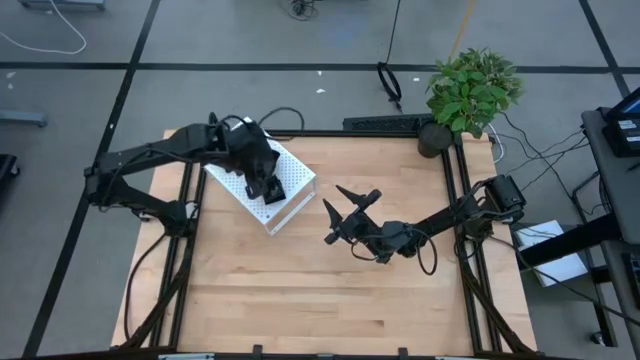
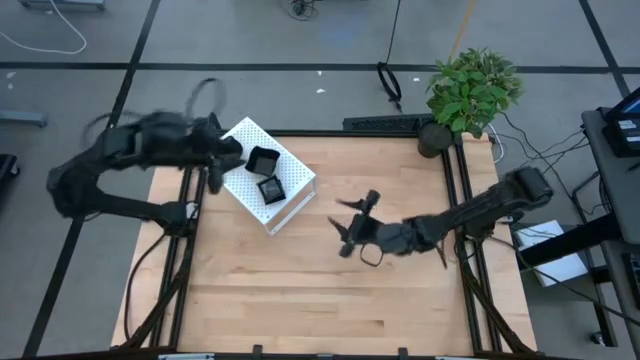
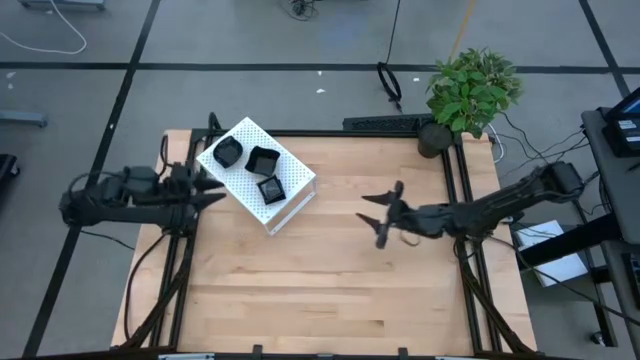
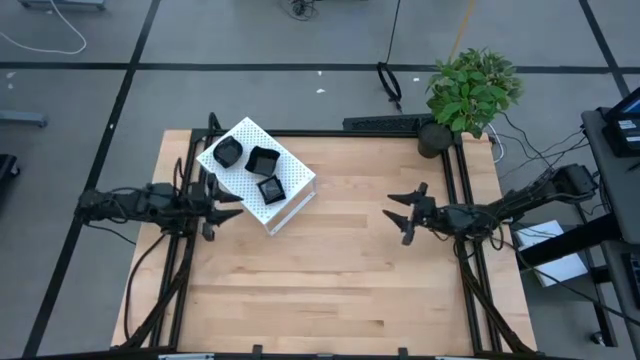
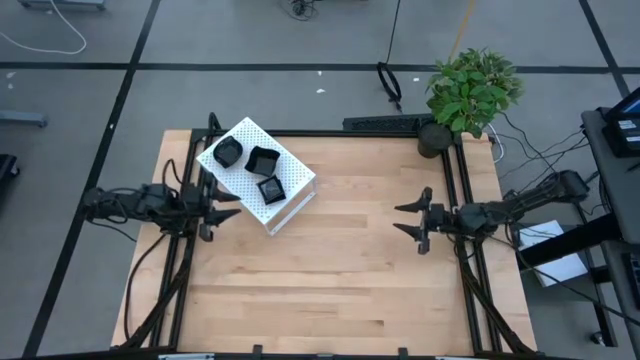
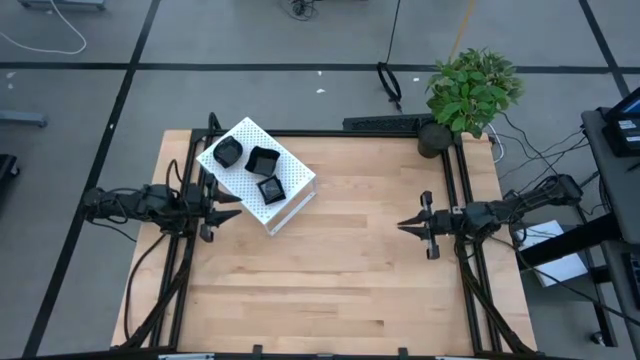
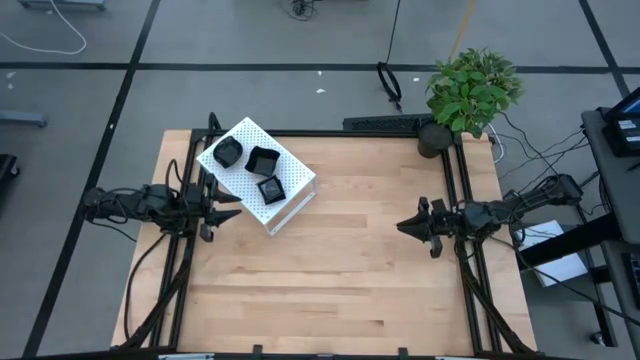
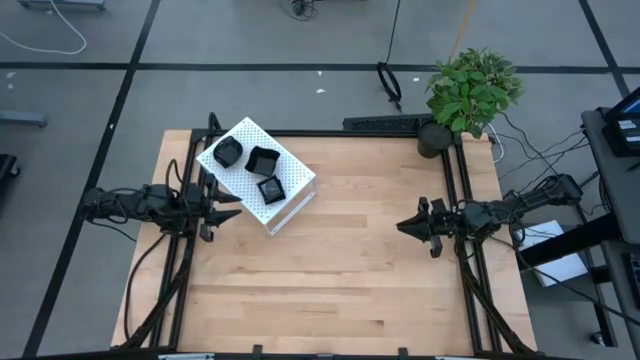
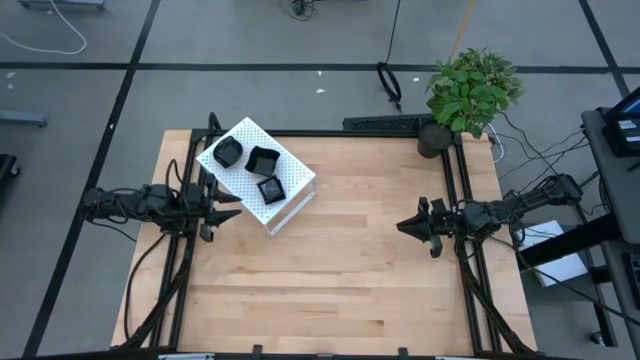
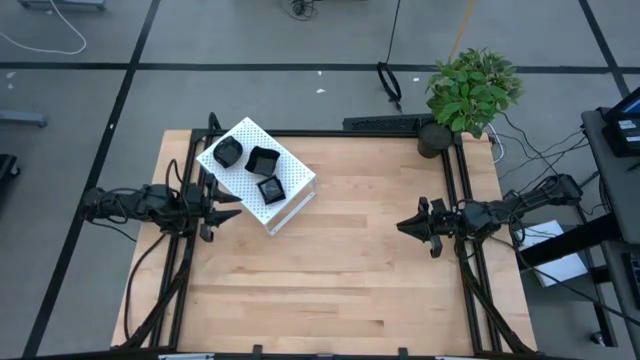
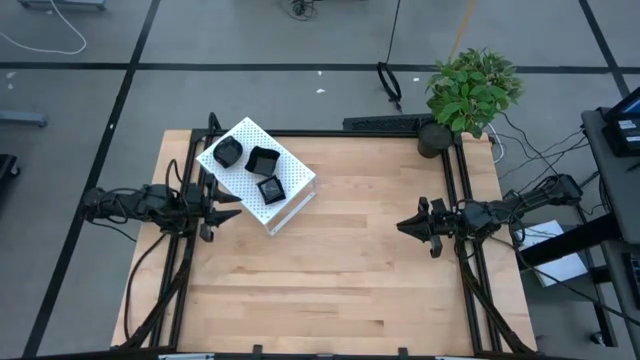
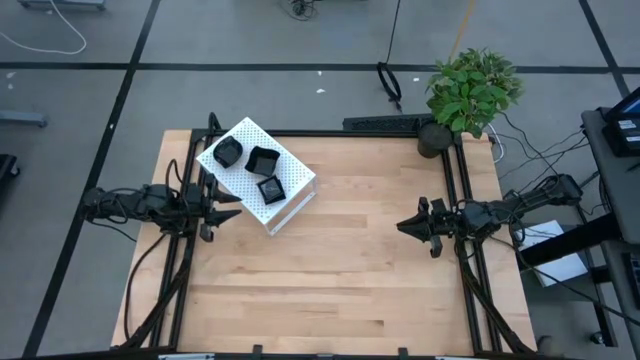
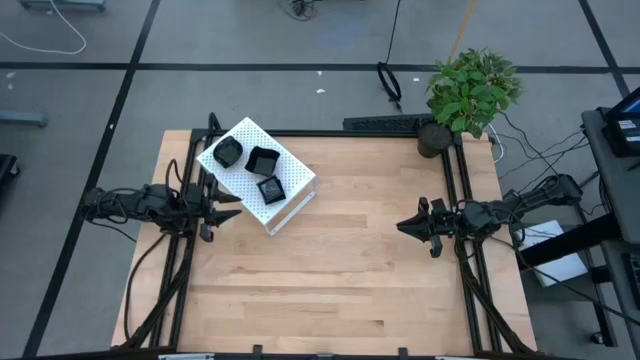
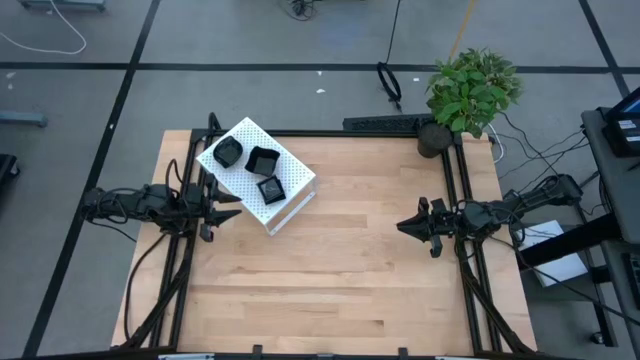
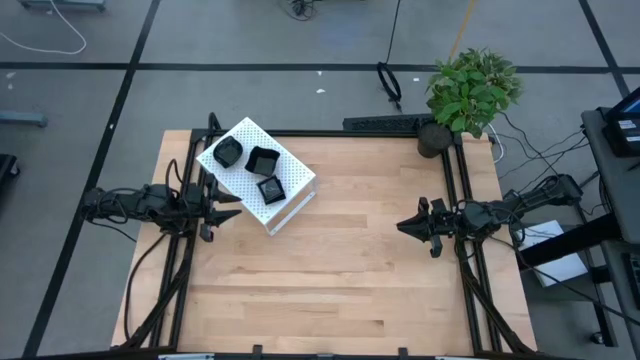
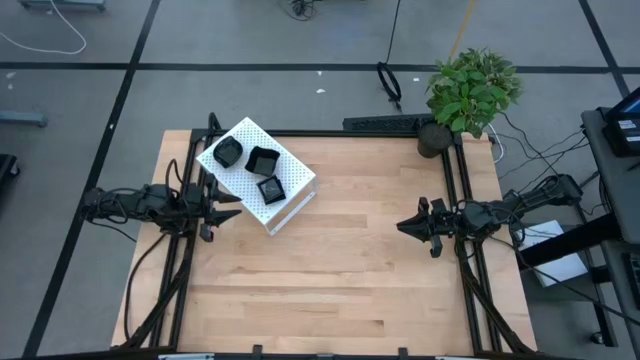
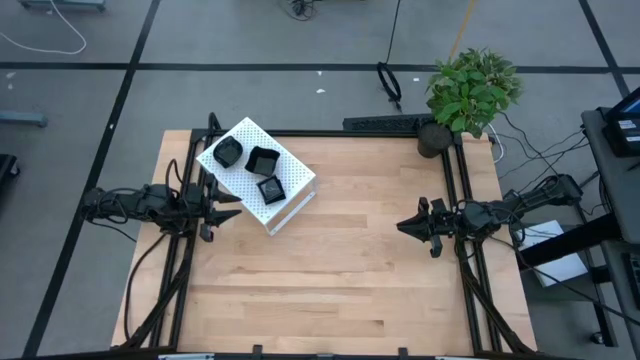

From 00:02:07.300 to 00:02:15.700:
Task: Pick & Place Mini shaped plates
Return to Home Position

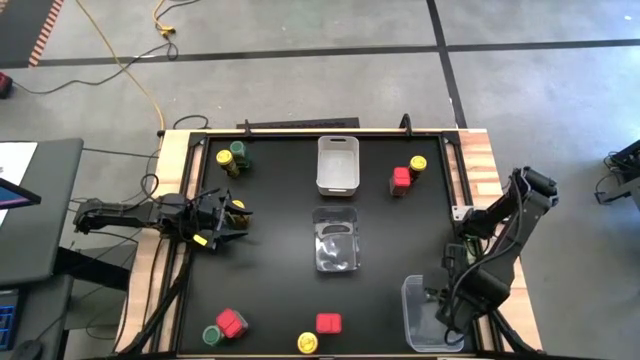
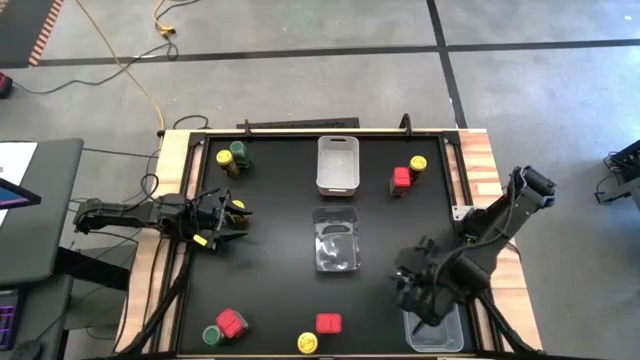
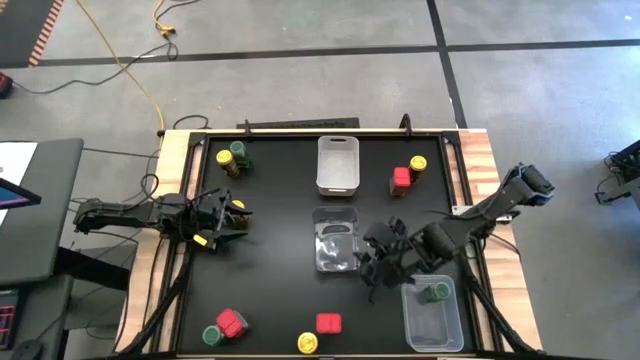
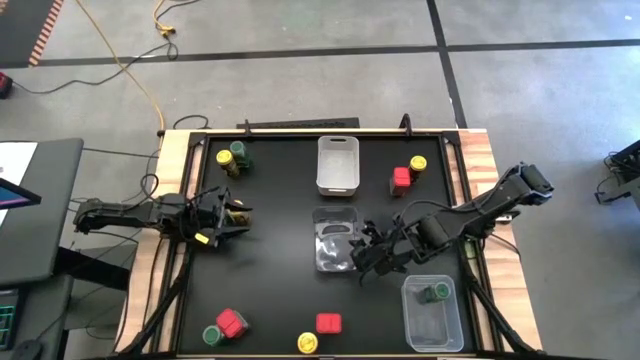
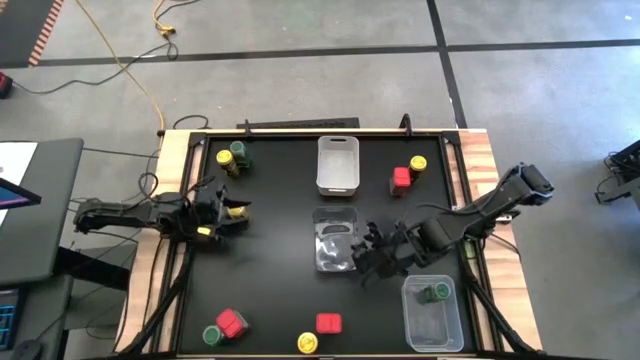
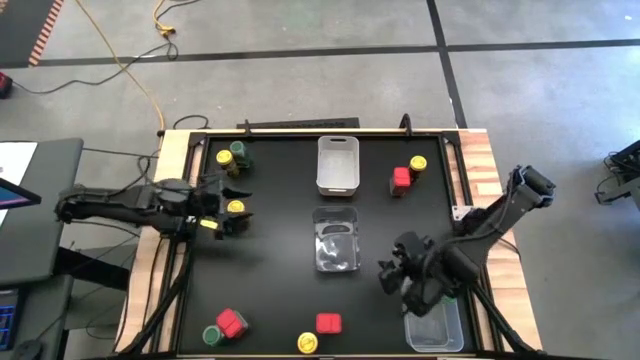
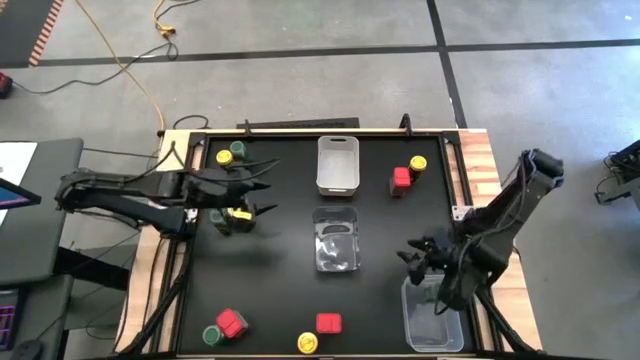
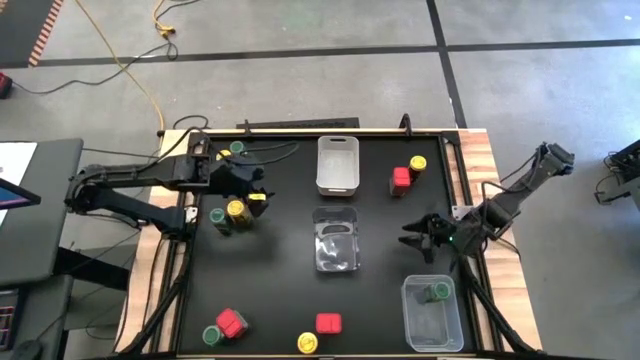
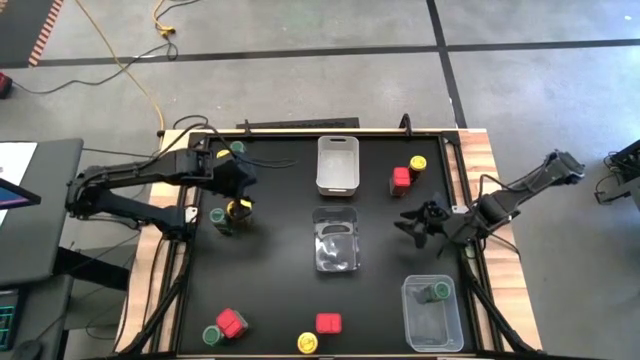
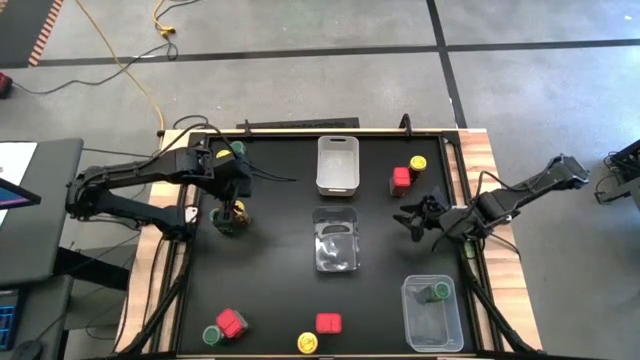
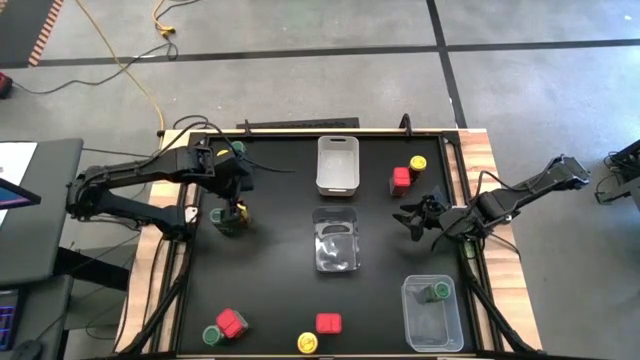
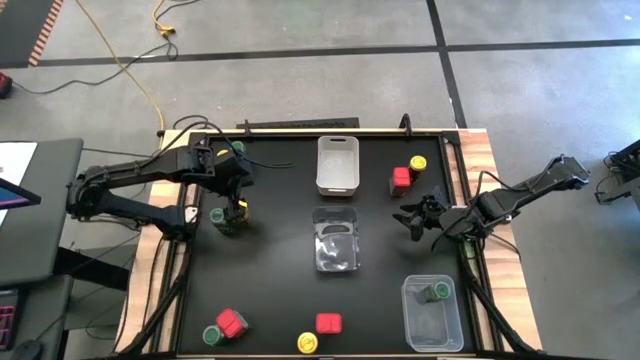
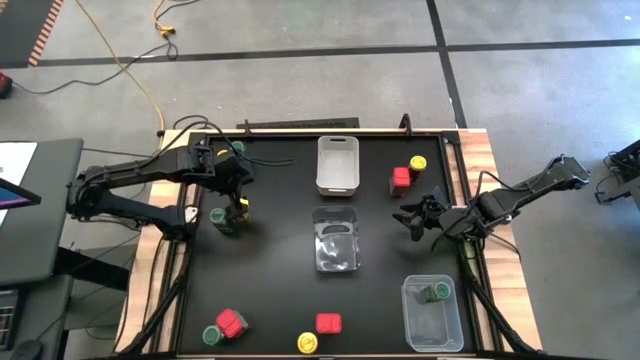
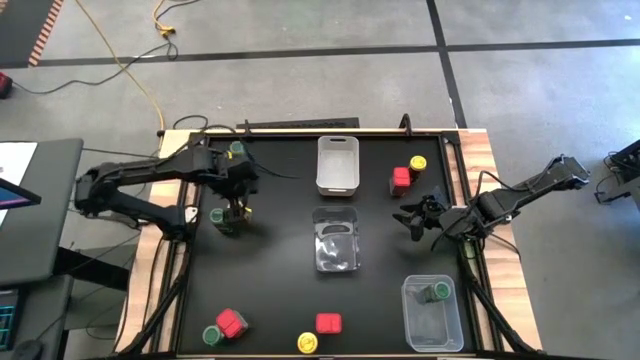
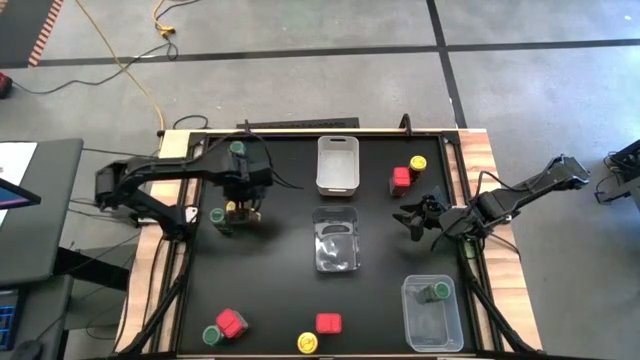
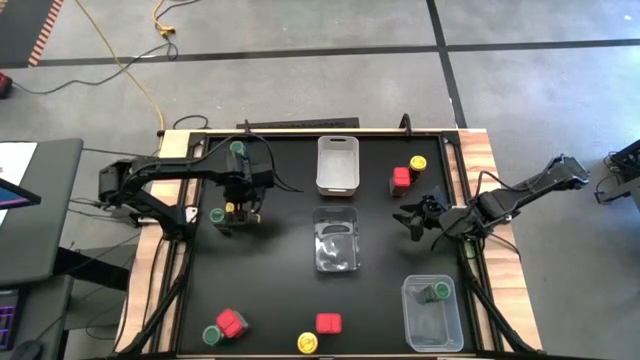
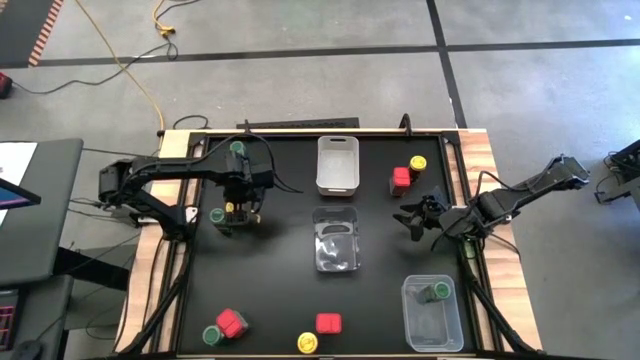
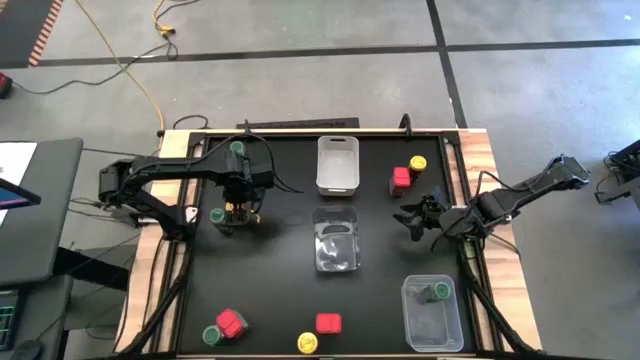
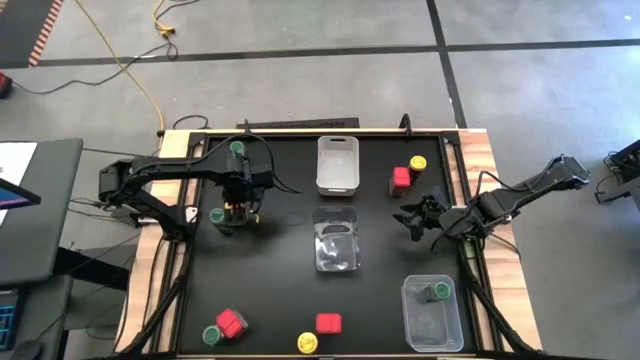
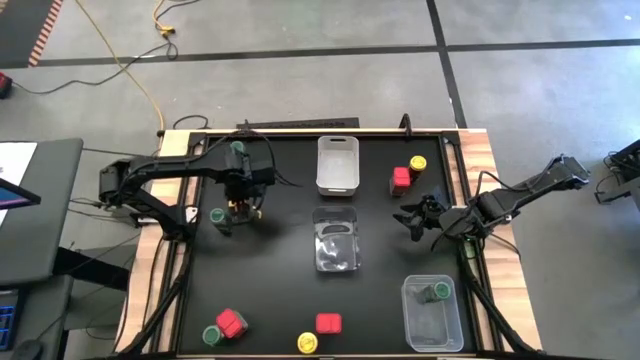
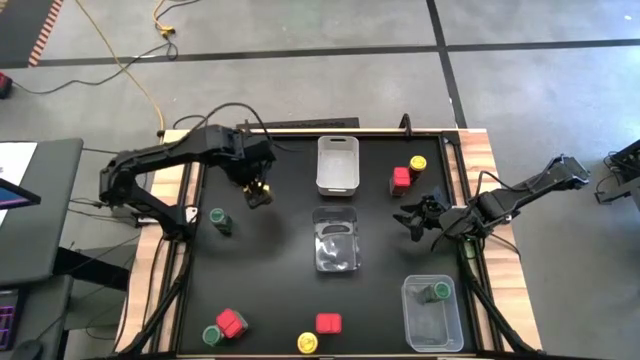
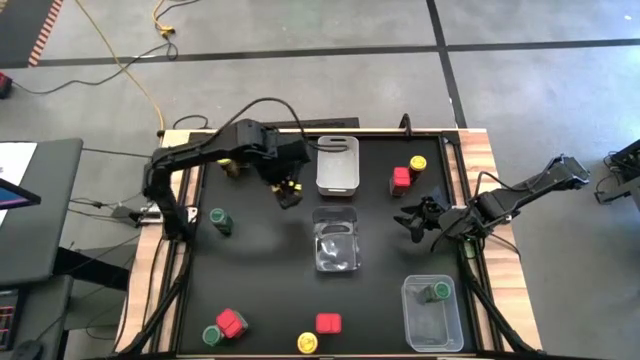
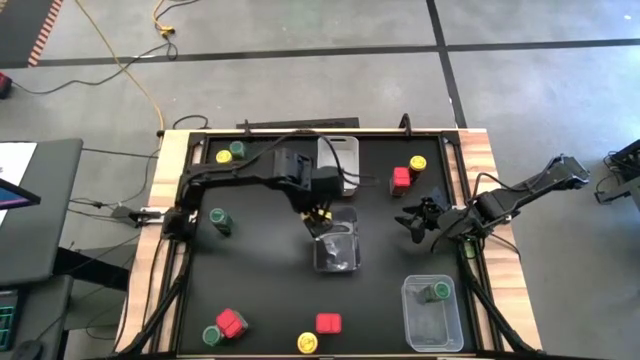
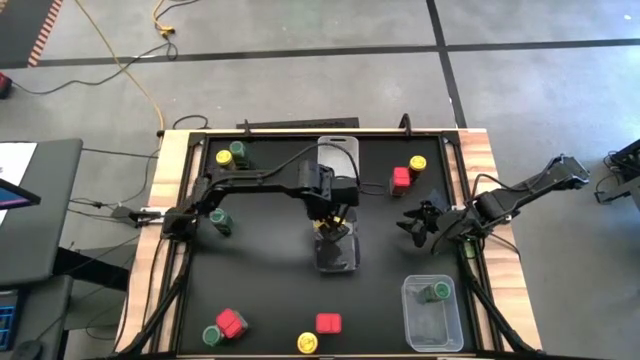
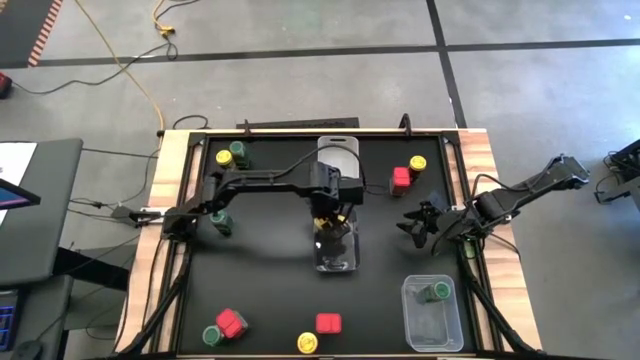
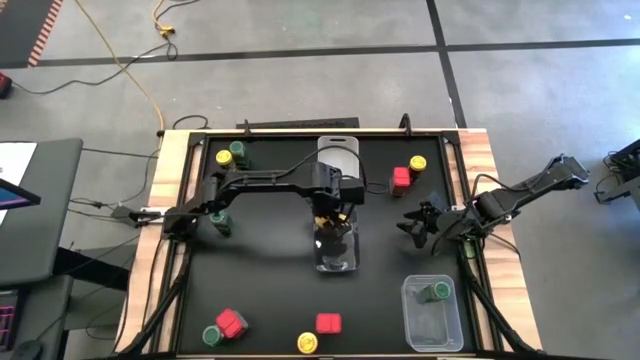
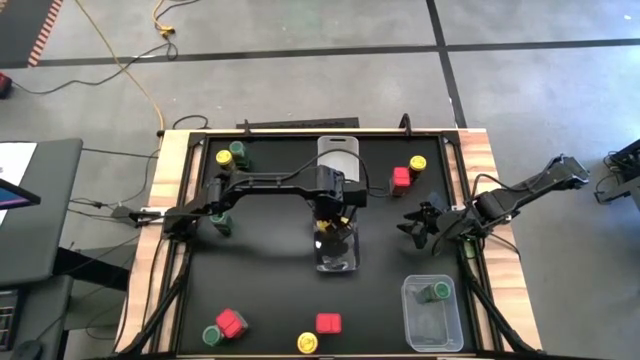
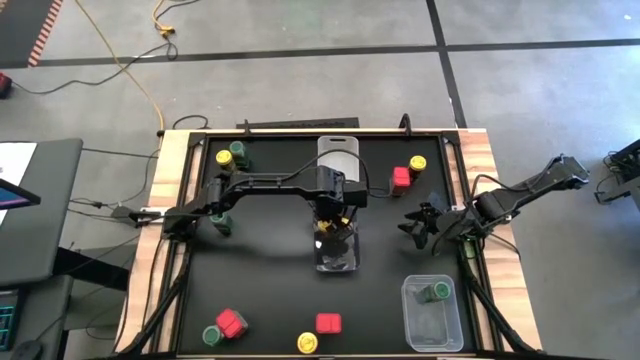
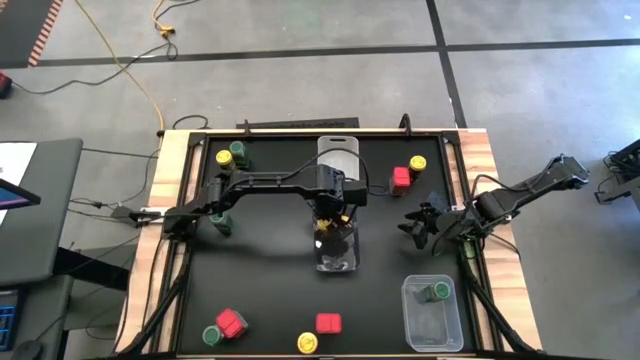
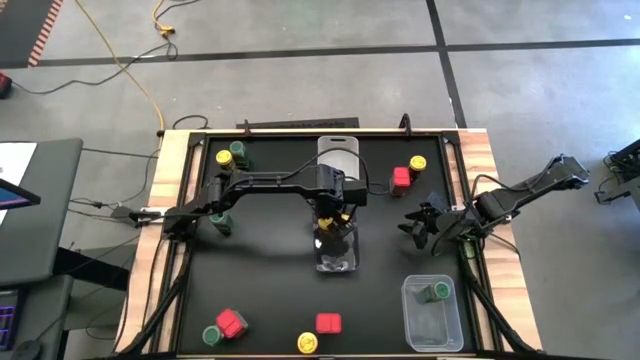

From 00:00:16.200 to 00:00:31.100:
Task: Sort spices by type
Put the middle left yellow seasoning bottle into the black bin
